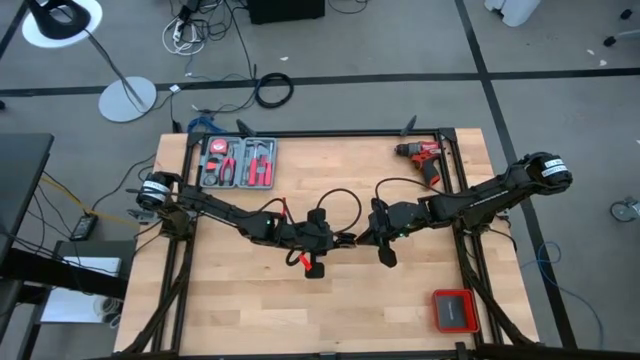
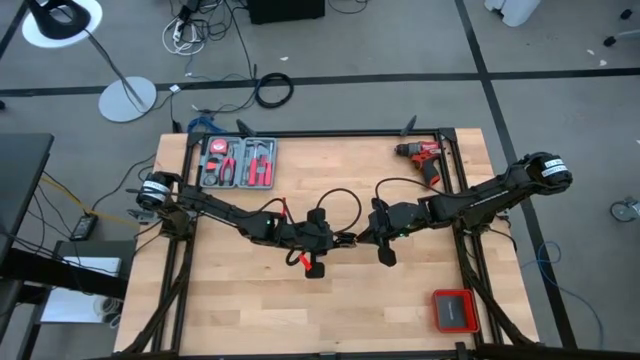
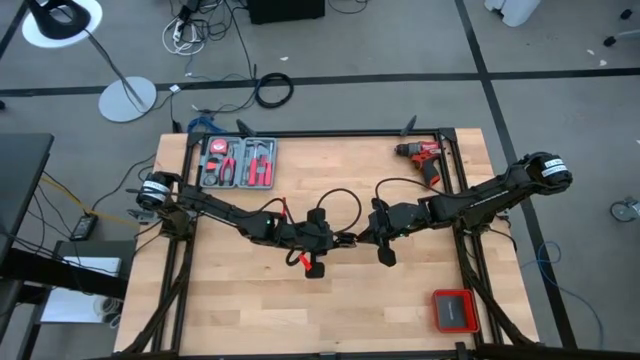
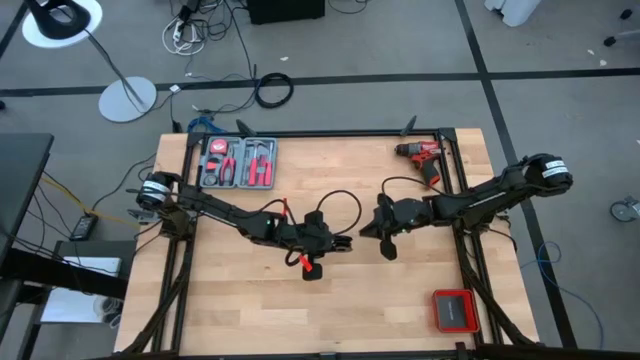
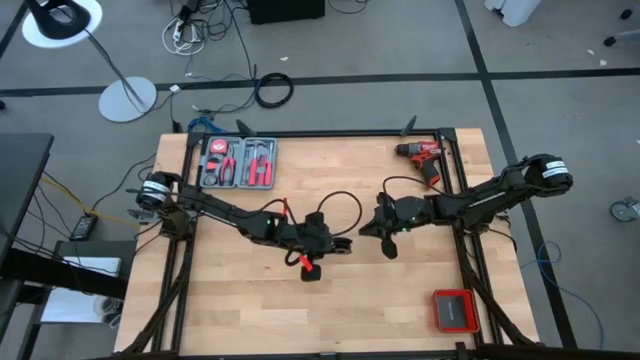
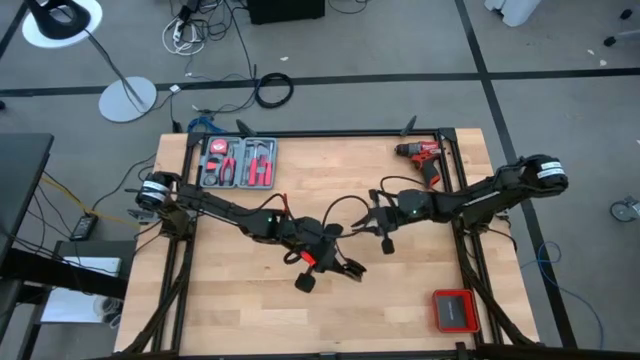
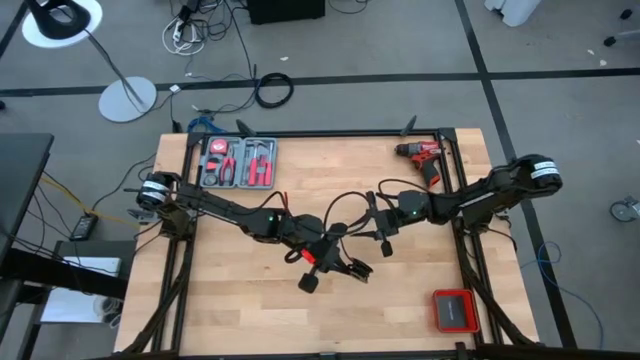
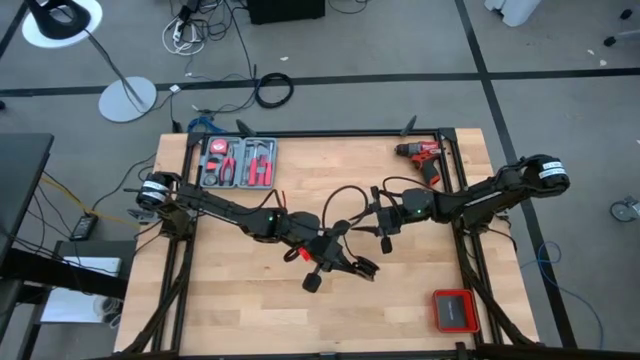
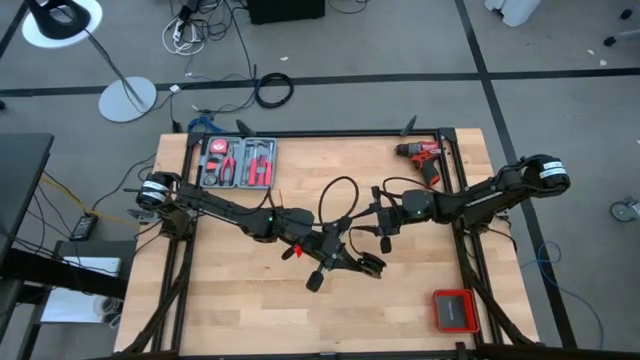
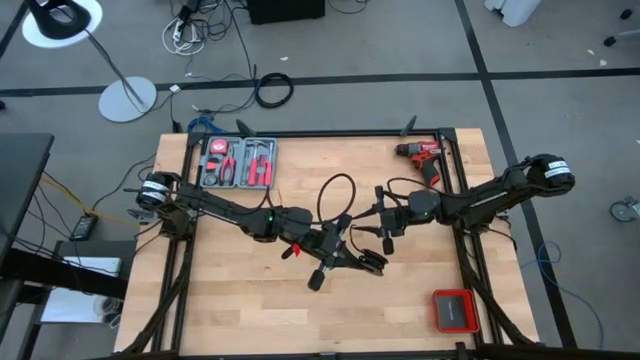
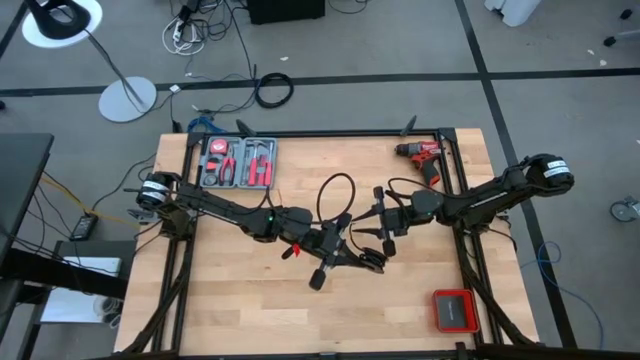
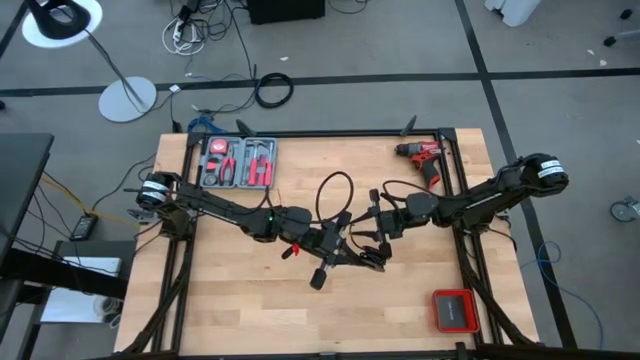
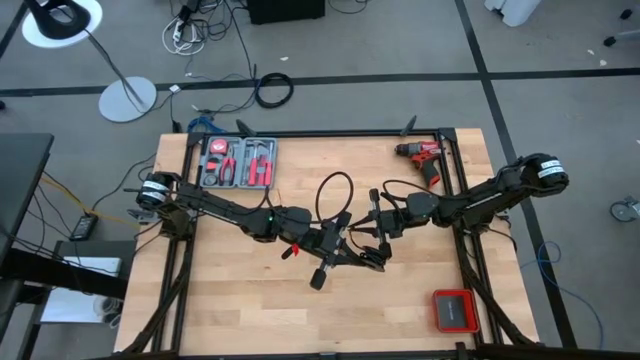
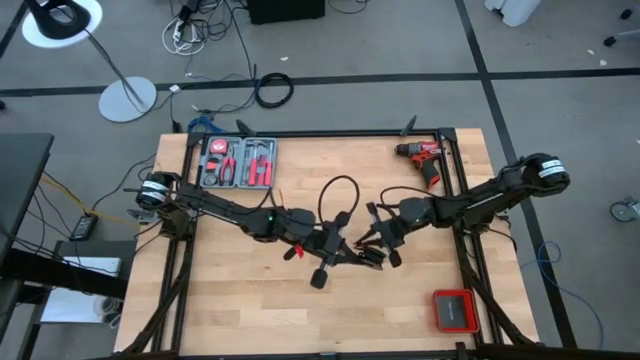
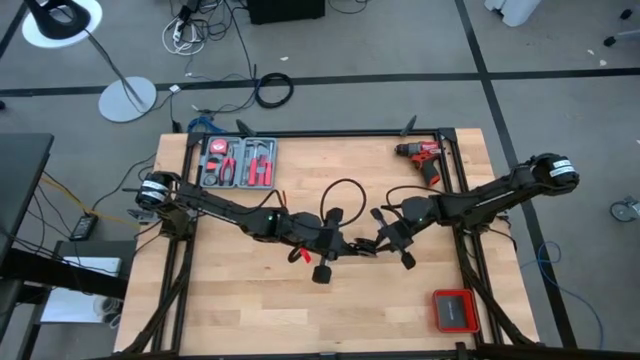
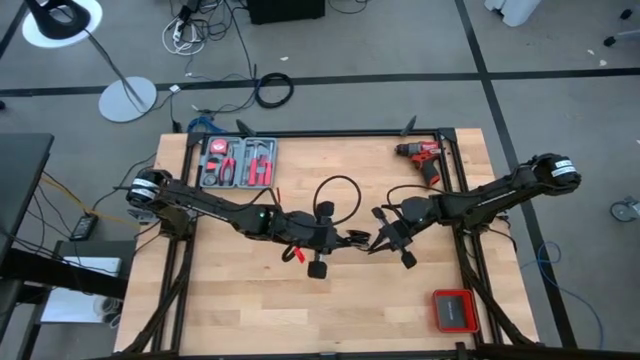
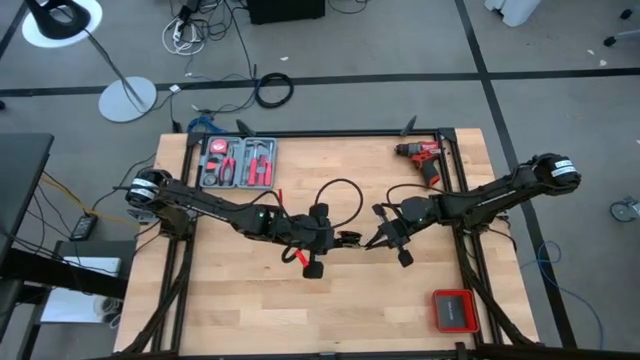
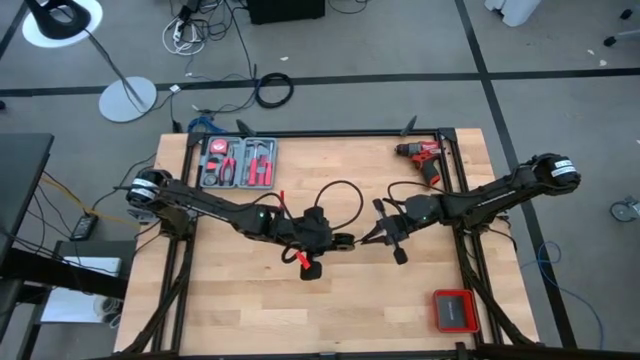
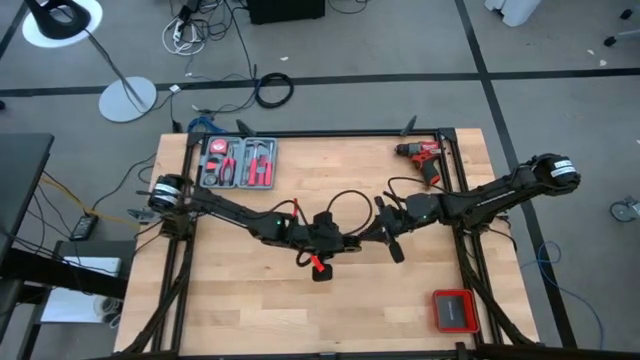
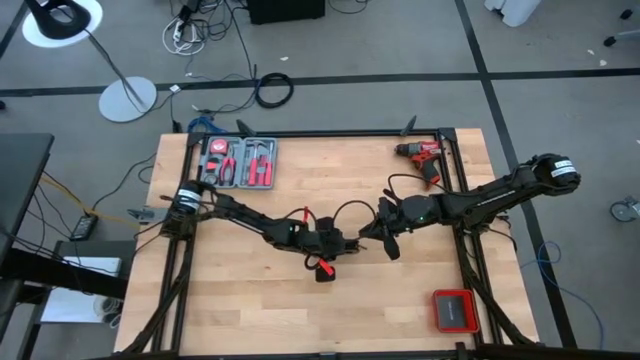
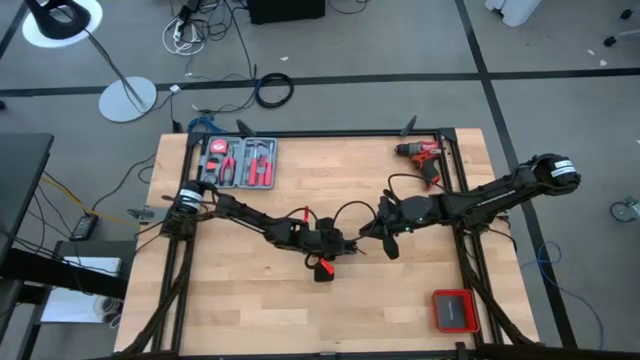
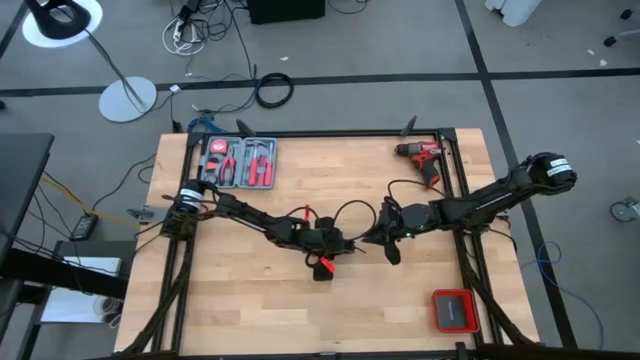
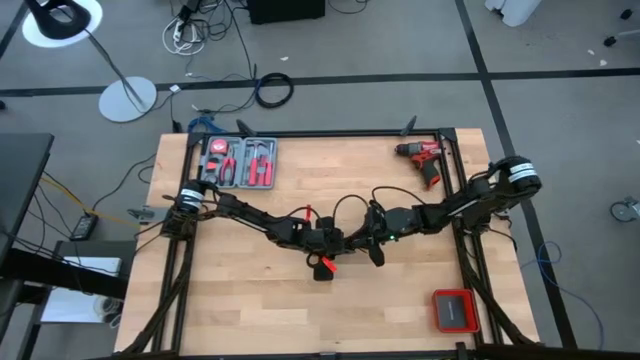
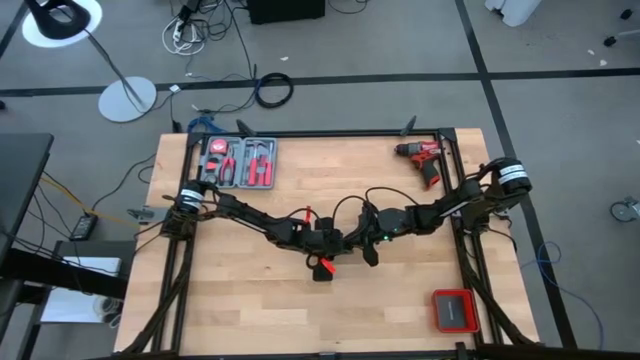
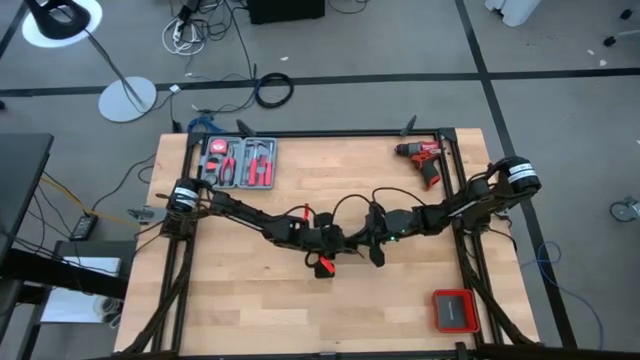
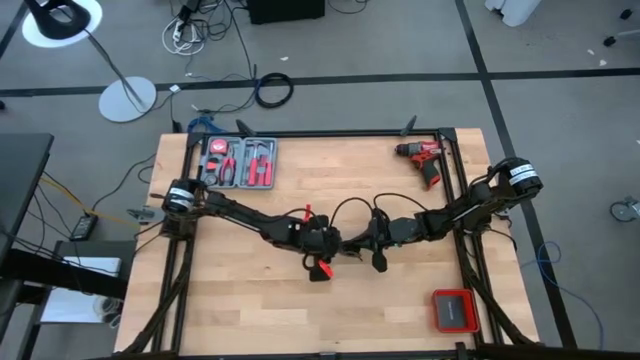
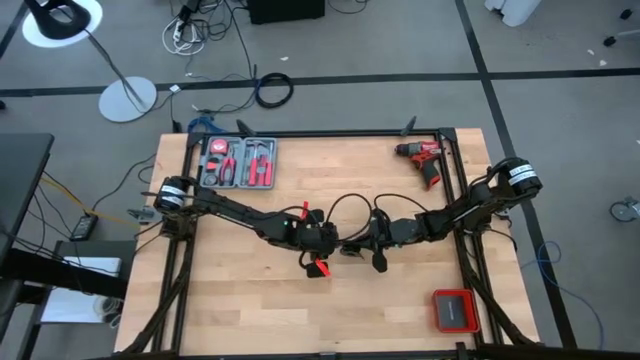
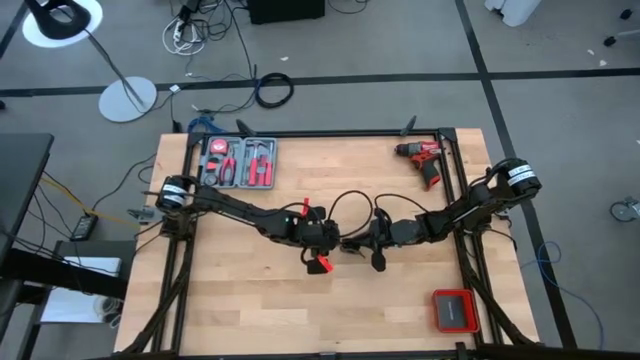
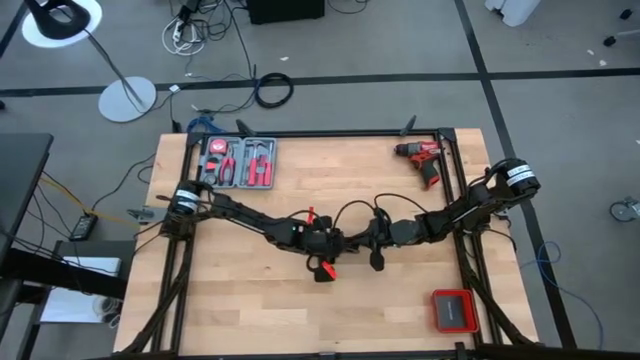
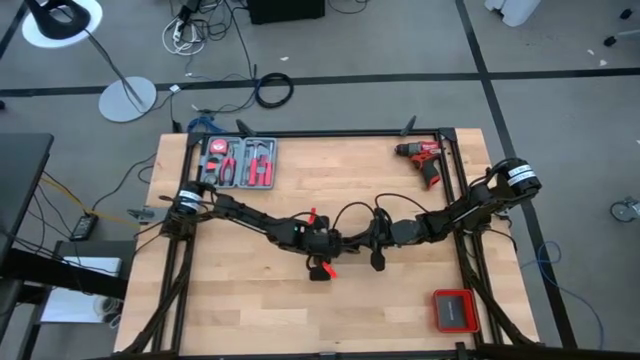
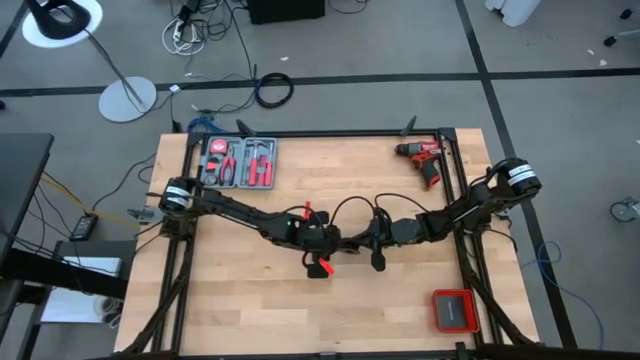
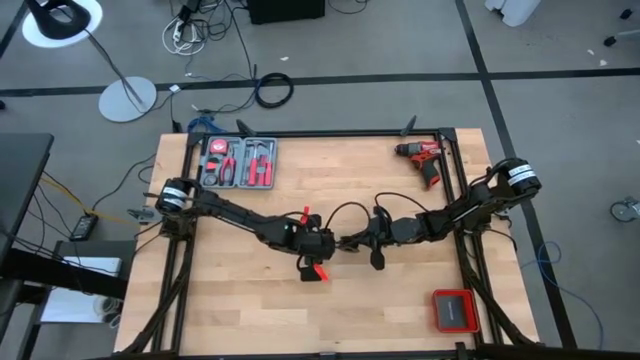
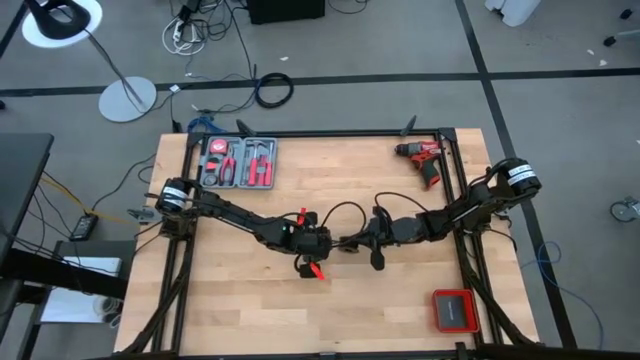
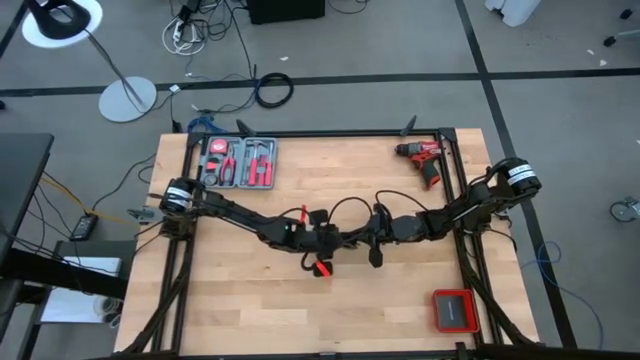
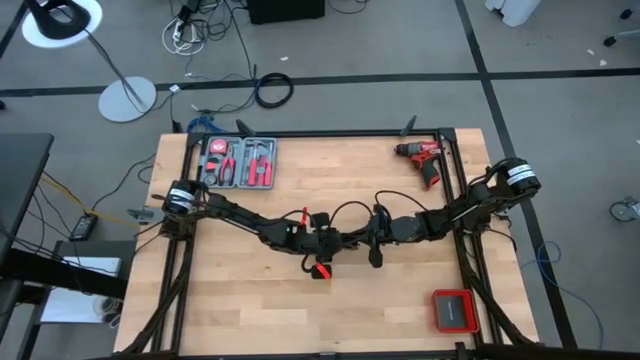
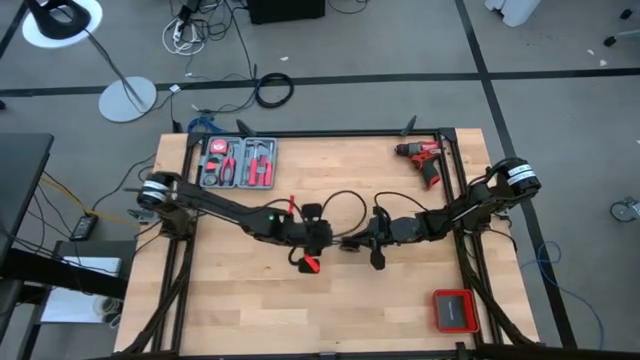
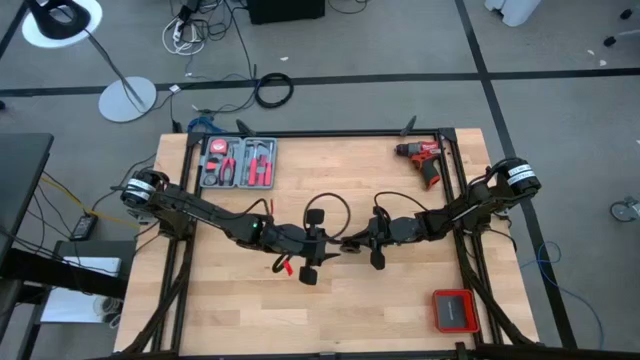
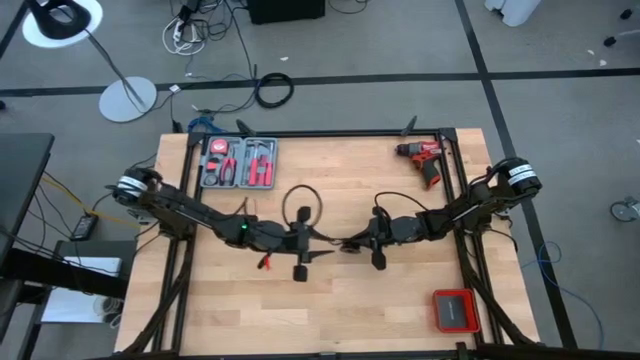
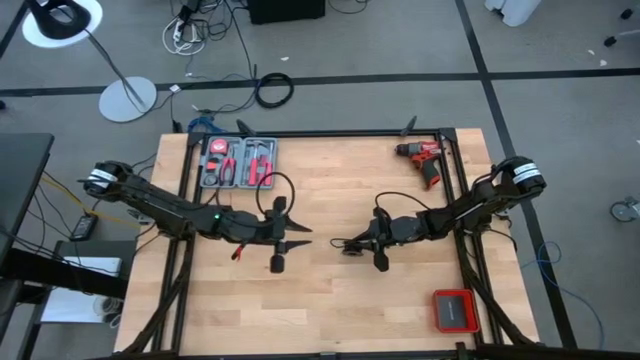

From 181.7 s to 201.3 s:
Task: Coil cords
Coil the black wire on the black spool

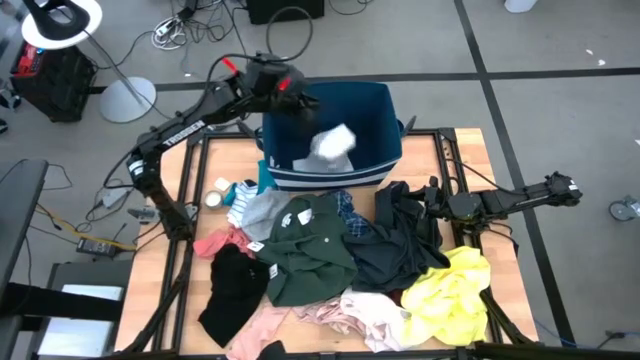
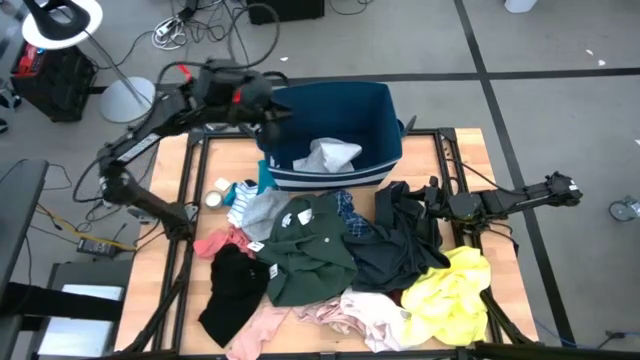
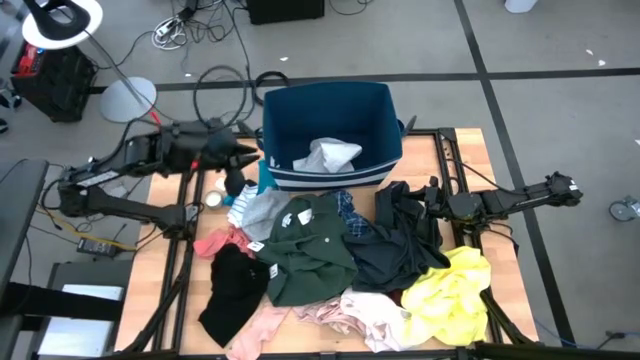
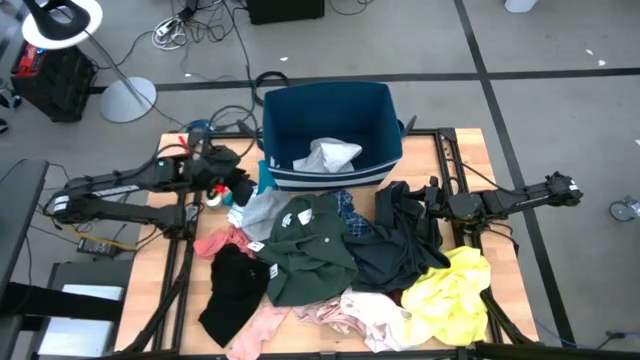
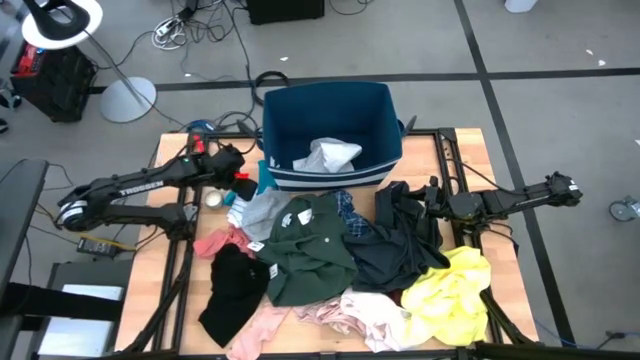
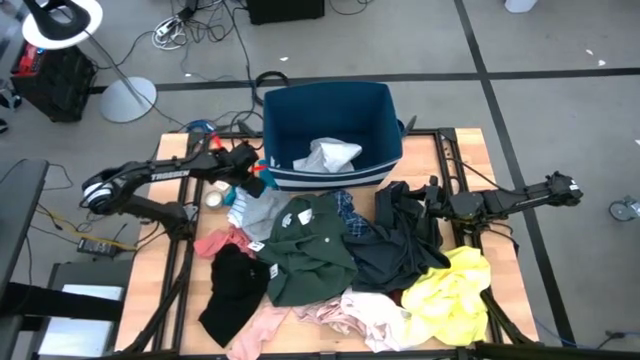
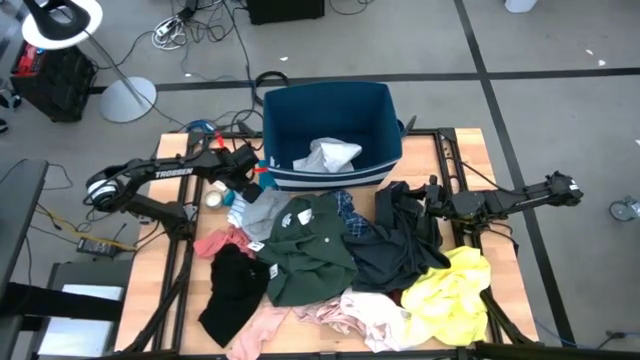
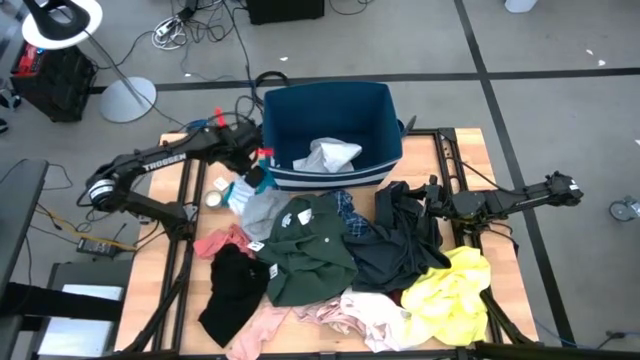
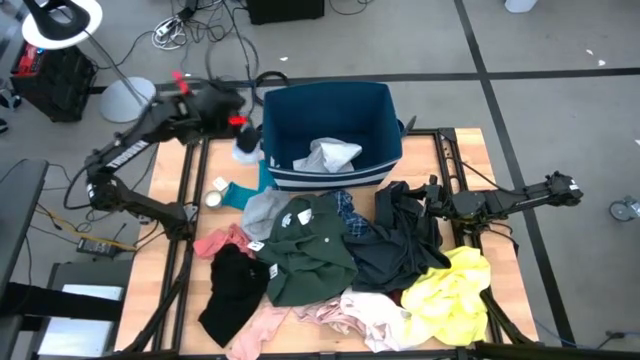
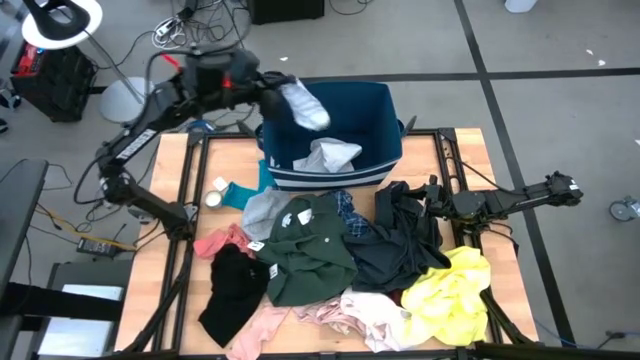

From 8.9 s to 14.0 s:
Task: Sort clothes
Put the white striped sock into the blue laundry bin
